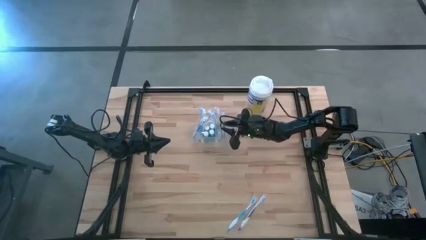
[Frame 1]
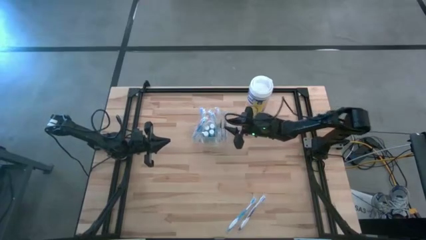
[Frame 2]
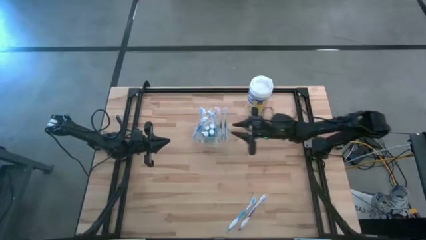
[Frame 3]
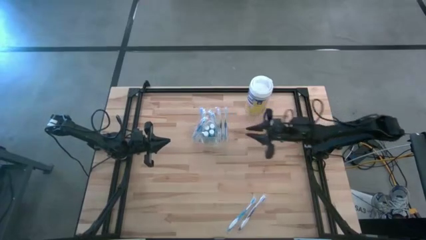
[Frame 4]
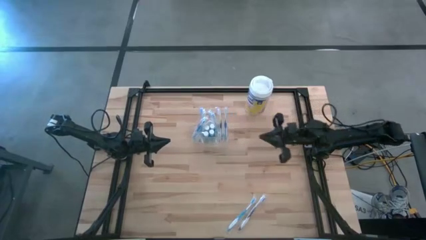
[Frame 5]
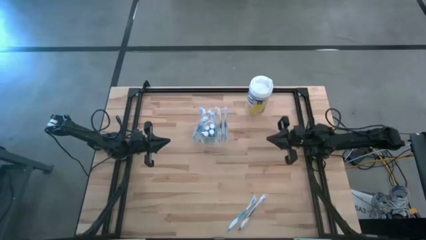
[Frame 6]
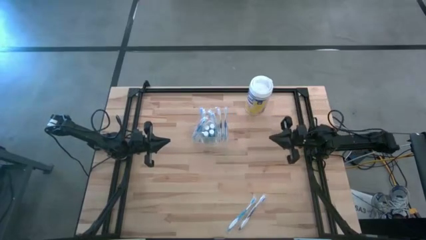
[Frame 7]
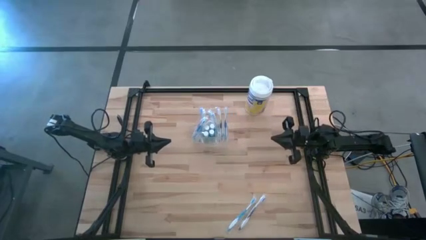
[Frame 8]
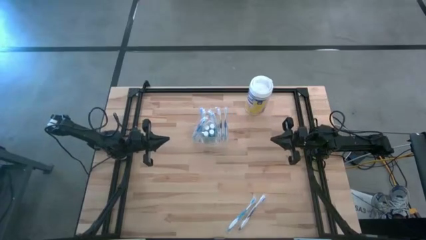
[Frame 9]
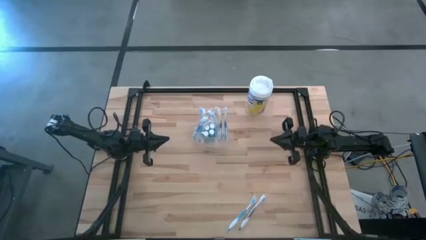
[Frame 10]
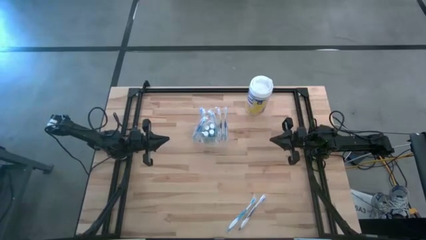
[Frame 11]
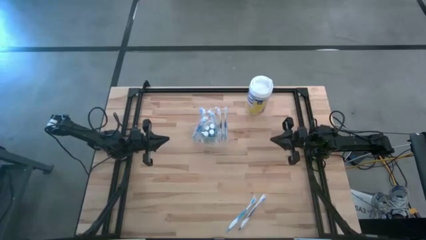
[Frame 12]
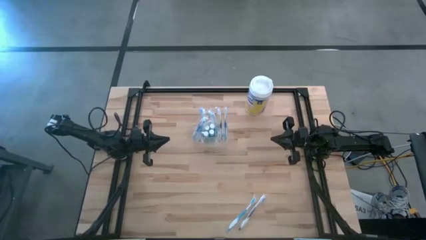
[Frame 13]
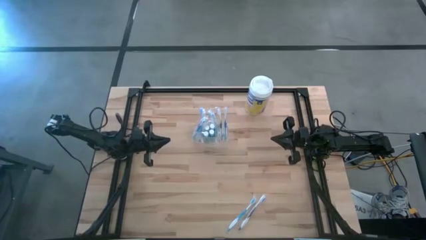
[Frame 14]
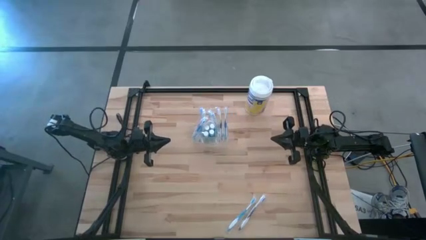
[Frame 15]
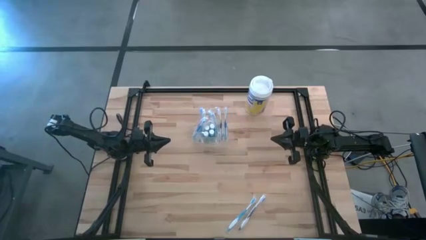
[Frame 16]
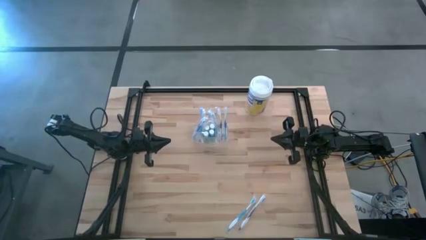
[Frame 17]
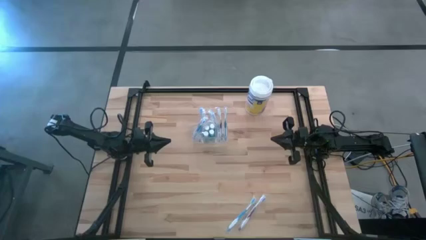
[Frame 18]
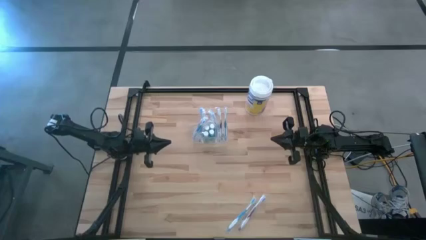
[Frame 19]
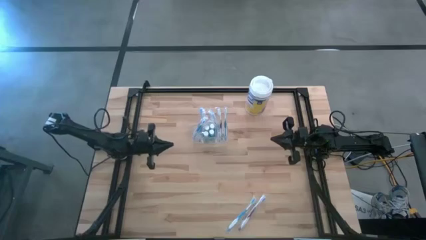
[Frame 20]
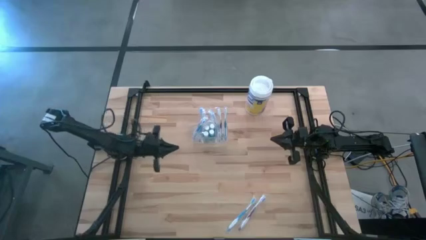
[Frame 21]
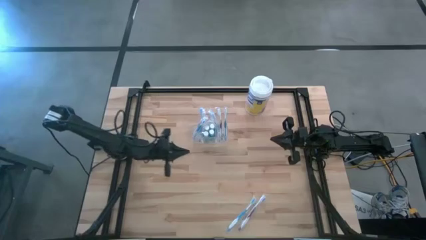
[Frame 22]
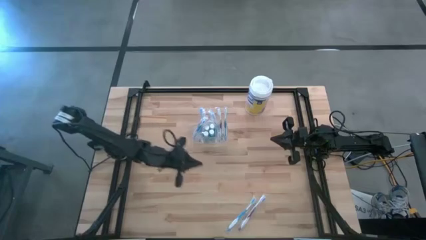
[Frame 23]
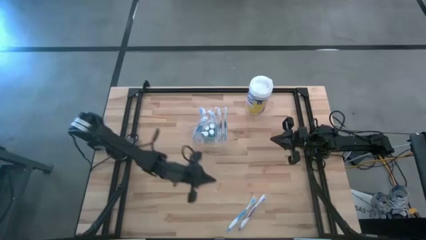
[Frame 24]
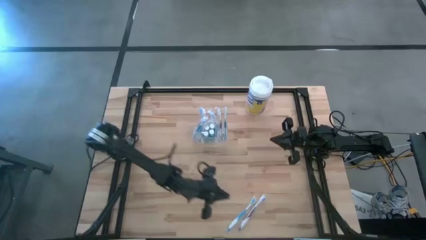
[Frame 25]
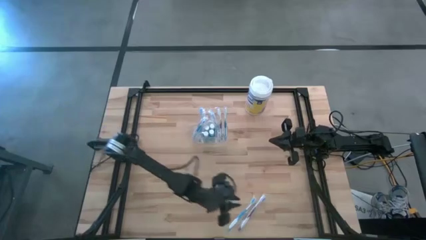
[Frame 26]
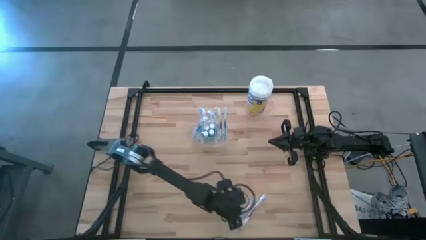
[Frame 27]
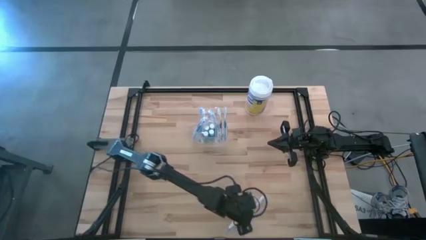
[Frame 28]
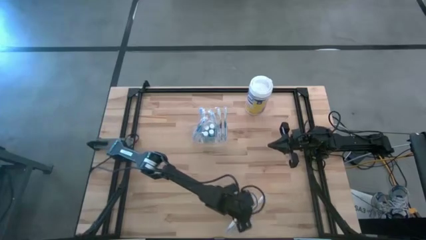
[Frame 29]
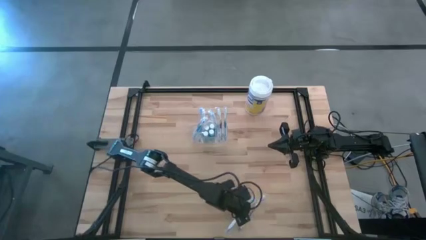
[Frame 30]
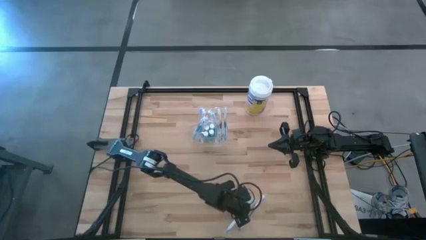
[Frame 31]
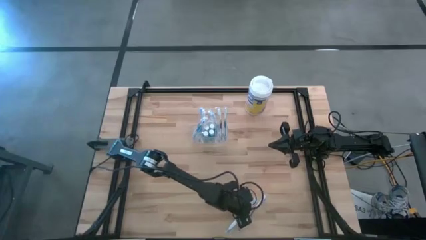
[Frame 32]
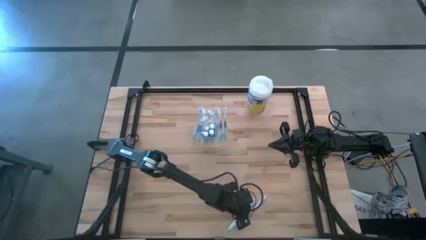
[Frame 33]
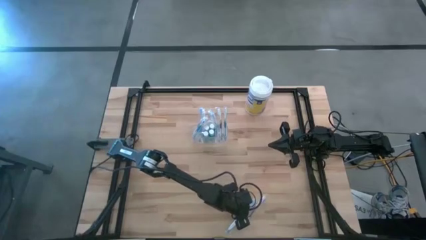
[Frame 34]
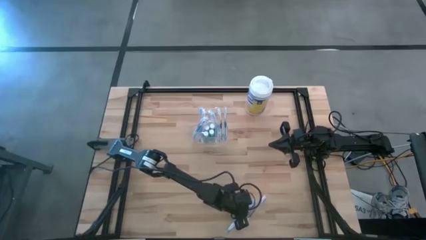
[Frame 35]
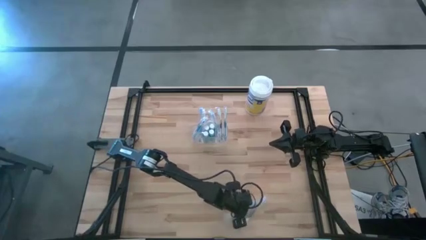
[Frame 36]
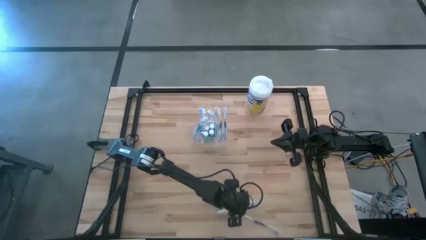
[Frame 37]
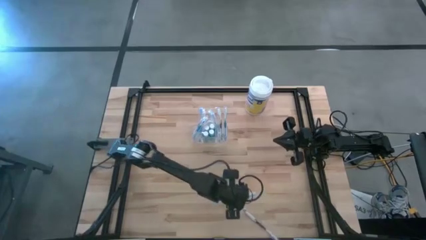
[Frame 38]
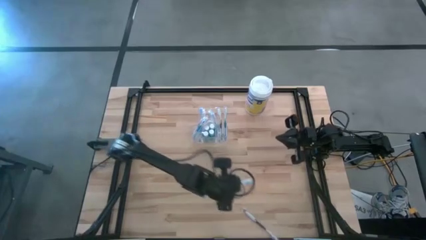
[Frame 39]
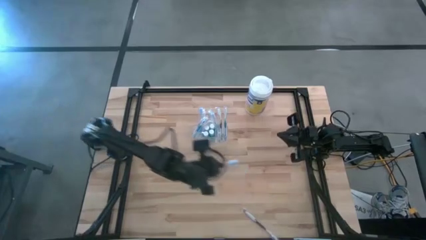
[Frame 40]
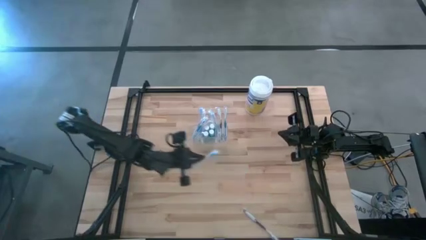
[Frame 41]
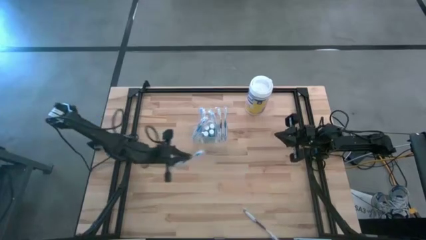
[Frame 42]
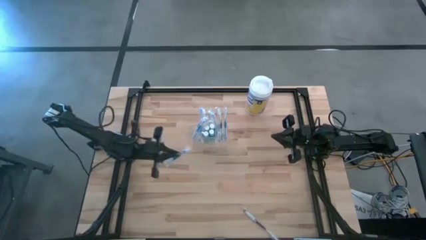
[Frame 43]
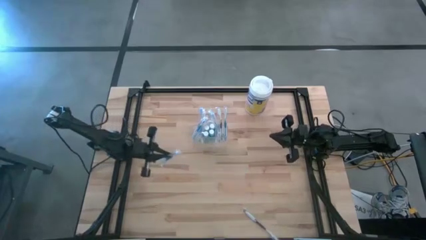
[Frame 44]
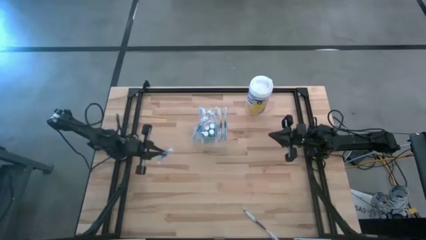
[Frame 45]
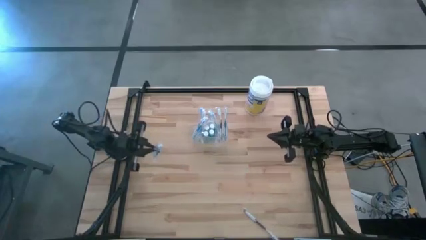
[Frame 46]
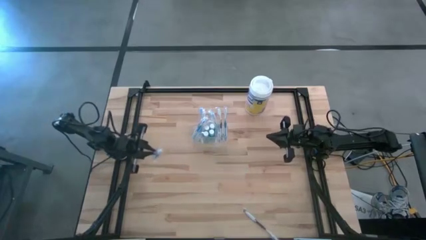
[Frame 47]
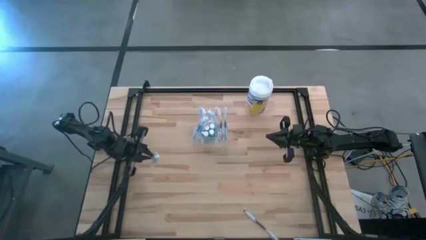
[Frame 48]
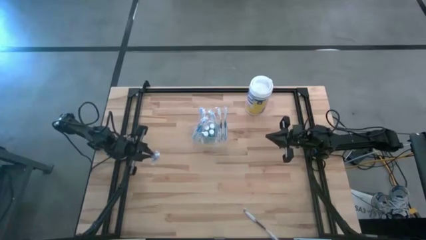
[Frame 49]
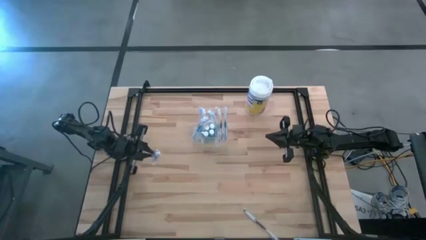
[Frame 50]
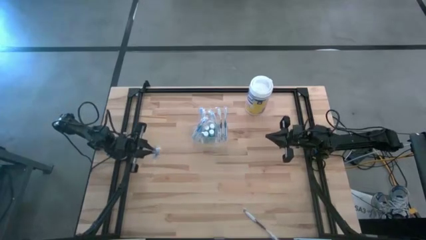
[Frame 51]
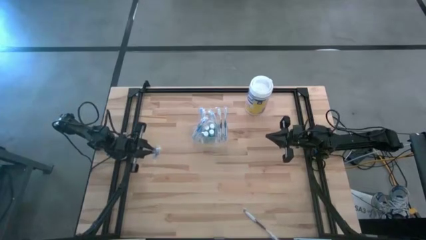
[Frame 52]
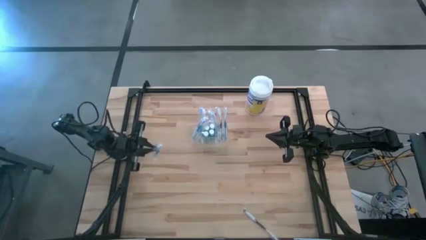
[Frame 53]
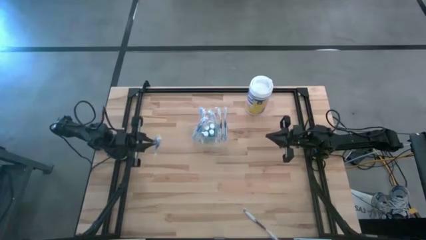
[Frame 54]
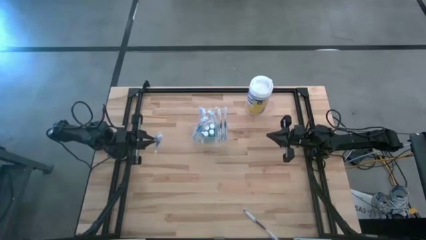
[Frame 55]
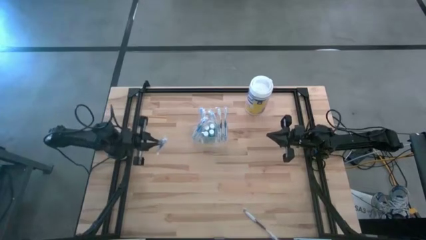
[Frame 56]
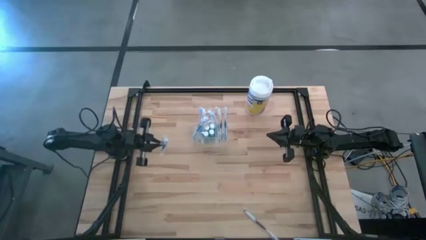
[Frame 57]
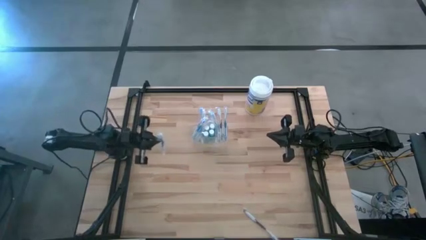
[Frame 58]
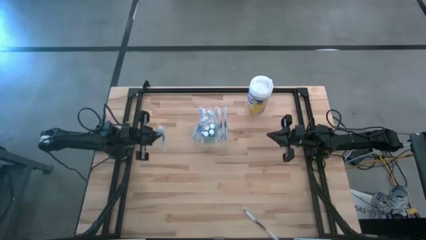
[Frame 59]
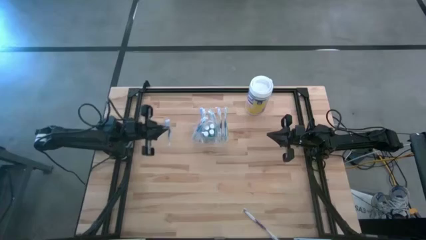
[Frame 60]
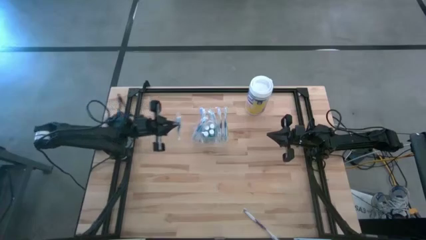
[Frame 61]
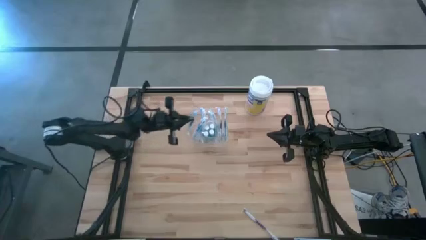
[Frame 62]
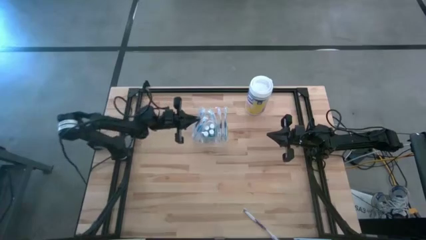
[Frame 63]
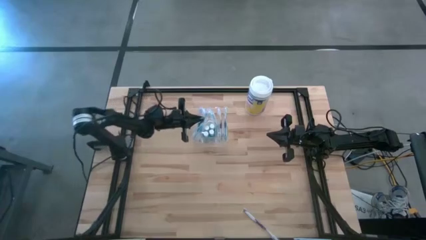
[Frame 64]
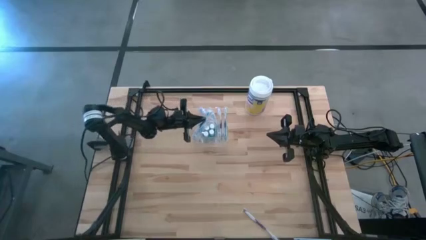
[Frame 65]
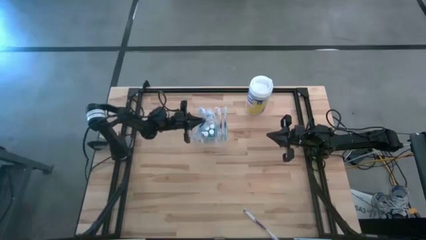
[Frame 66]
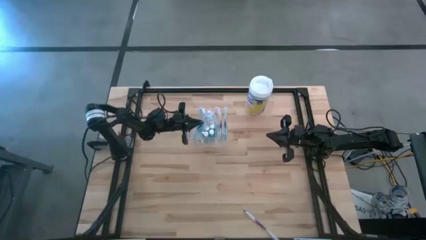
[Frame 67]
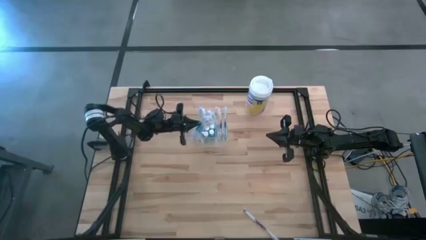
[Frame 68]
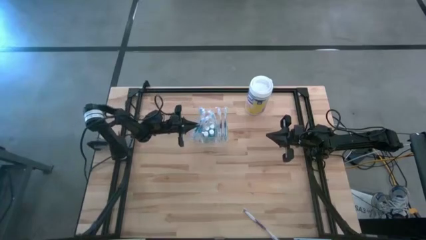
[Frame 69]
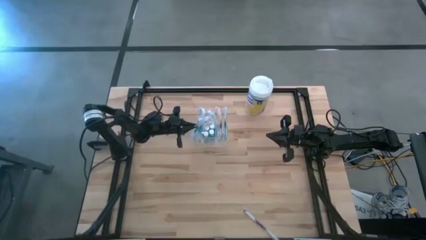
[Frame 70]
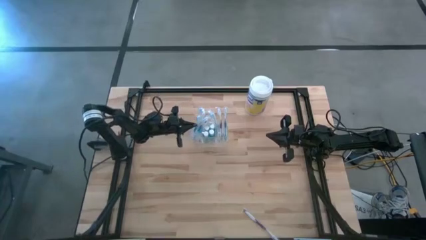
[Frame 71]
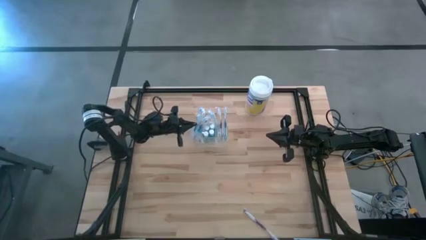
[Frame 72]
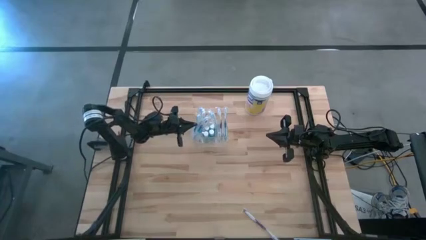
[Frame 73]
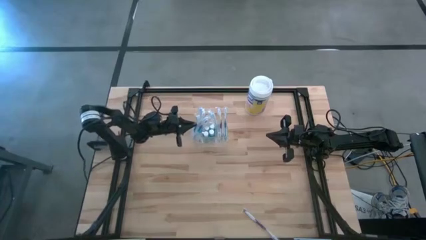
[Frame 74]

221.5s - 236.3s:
Task: Pick & Place toothbrushing station
Put the blue toothbrush into the transparent organizer

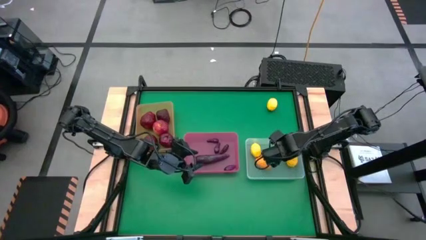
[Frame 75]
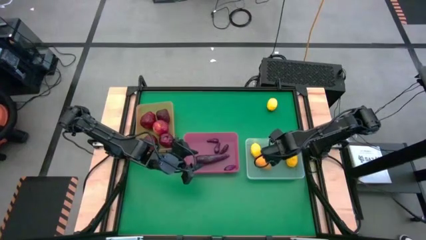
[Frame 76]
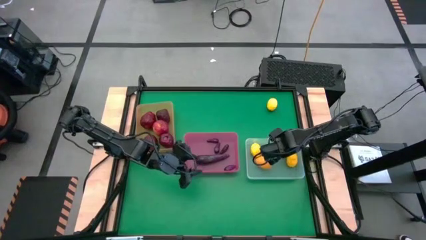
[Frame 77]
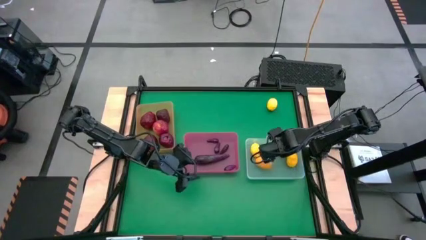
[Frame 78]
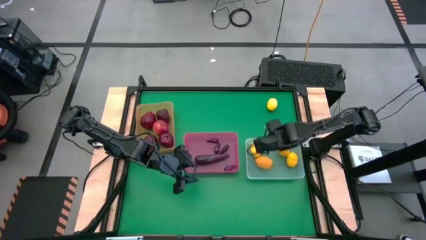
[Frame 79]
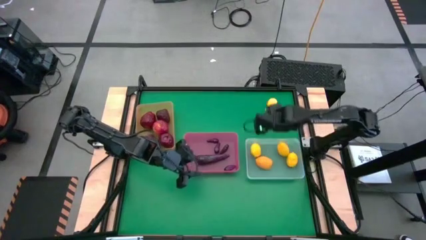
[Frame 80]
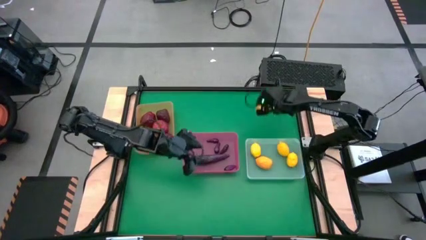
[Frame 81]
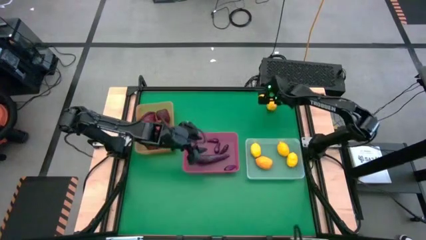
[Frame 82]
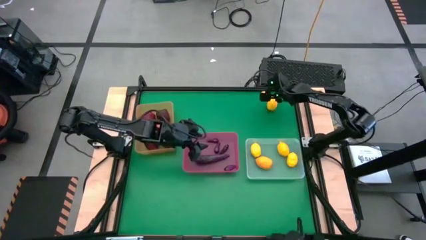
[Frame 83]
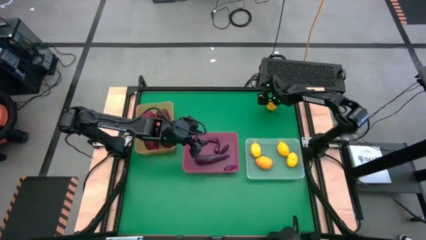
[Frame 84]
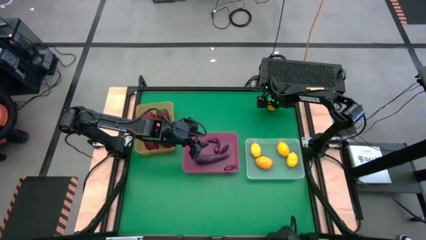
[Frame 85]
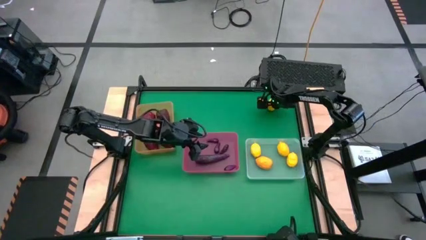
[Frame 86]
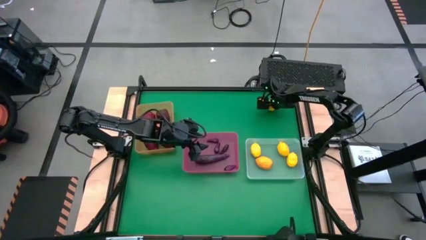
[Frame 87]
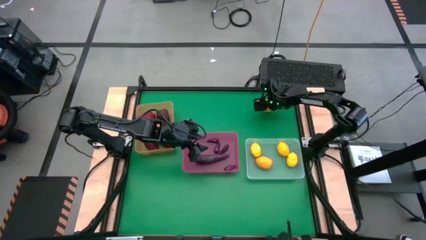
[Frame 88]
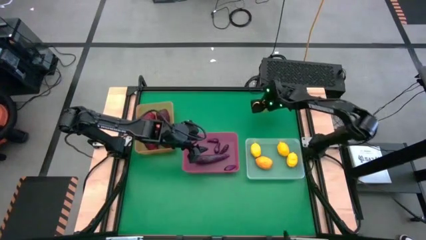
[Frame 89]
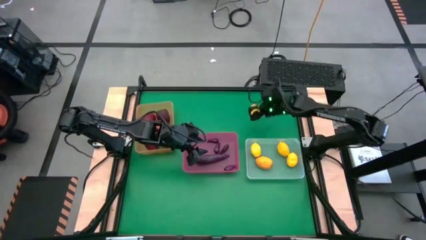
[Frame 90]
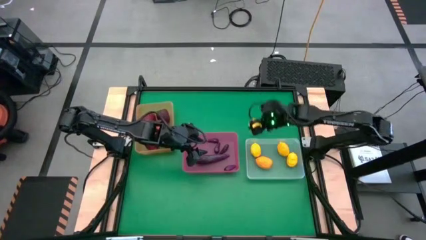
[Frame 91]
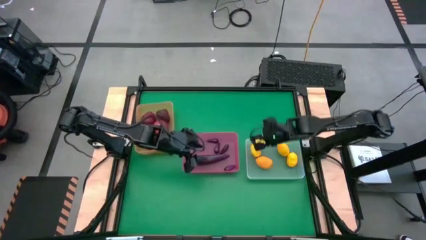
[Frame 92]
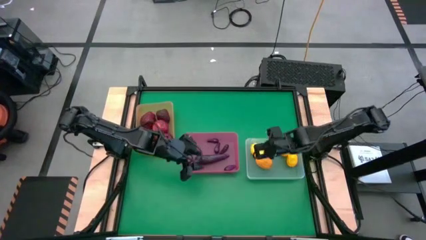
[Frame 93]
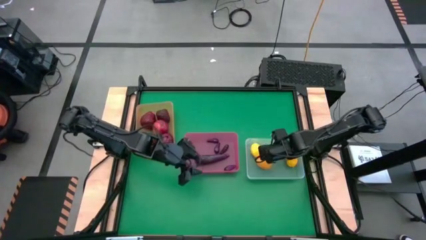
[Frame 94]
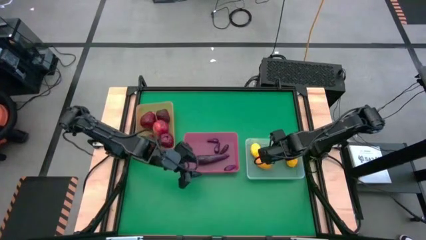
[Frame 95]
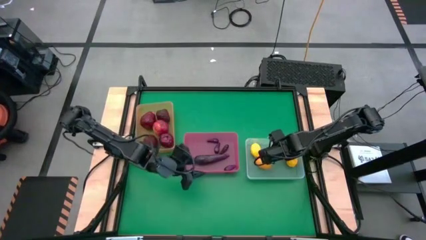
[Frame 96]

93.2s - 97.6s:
Task: Sort produce into baskets
Put the yellow lemon into the transparent bin
